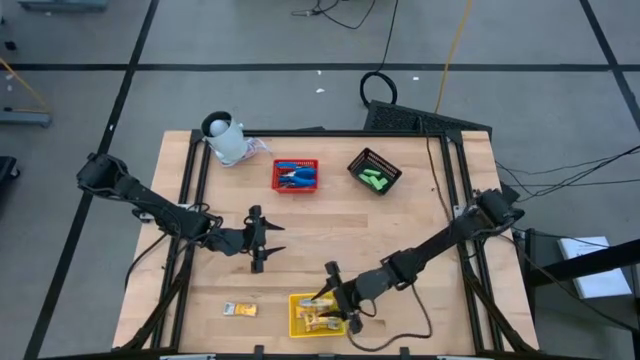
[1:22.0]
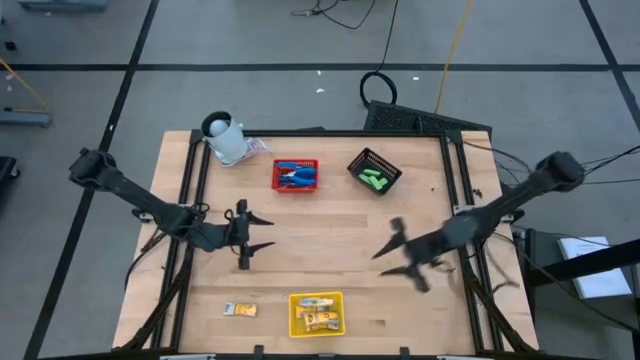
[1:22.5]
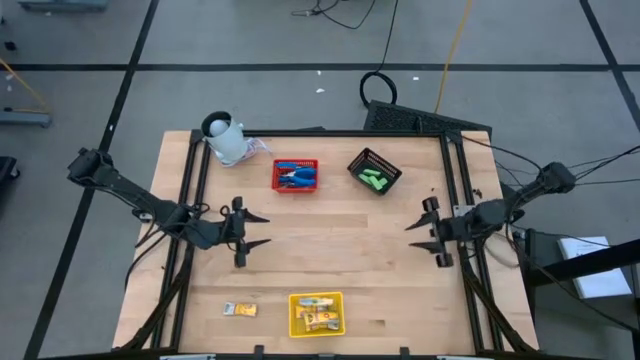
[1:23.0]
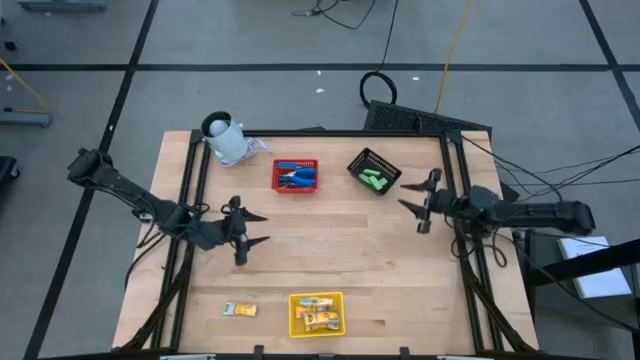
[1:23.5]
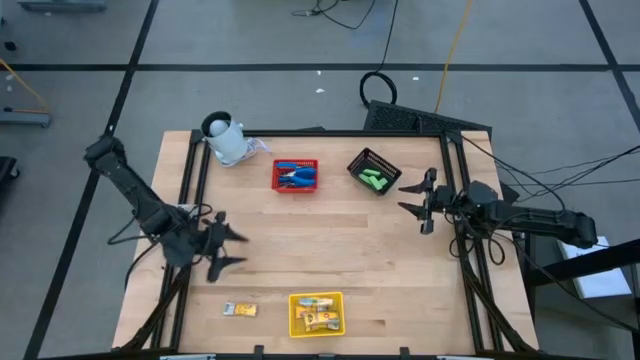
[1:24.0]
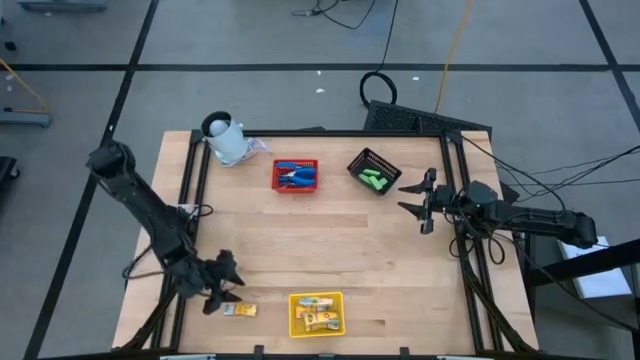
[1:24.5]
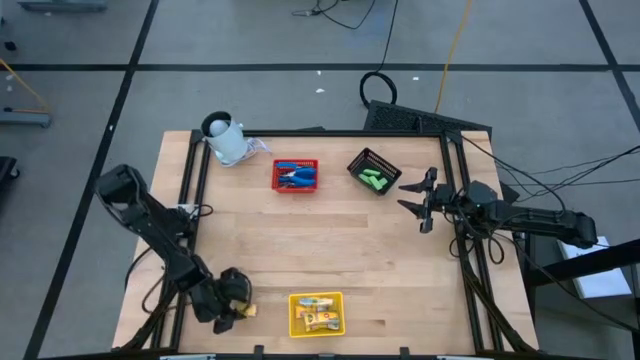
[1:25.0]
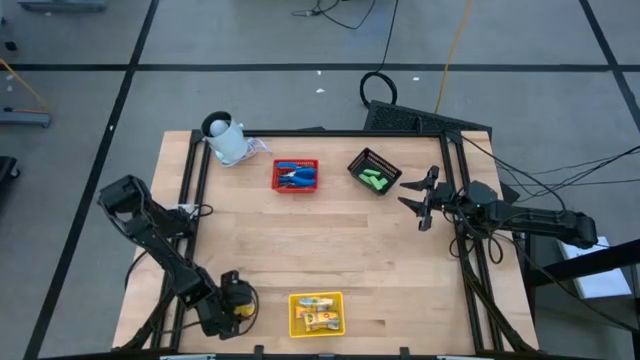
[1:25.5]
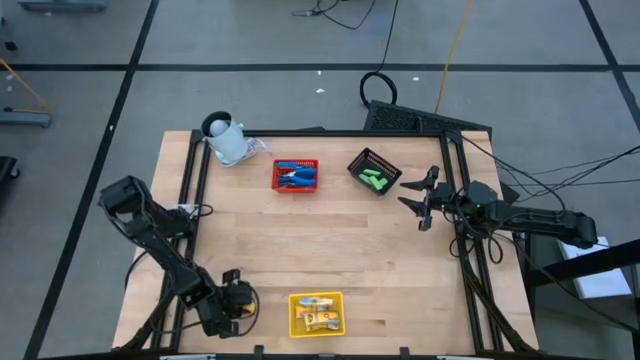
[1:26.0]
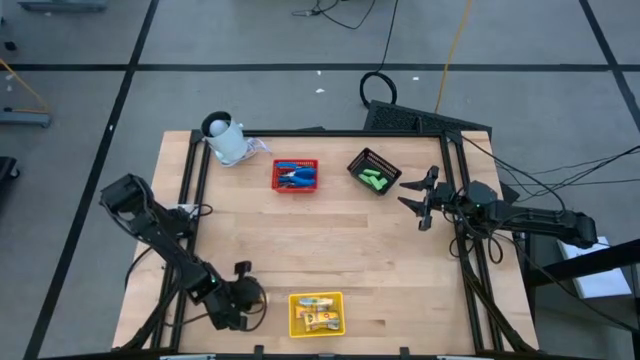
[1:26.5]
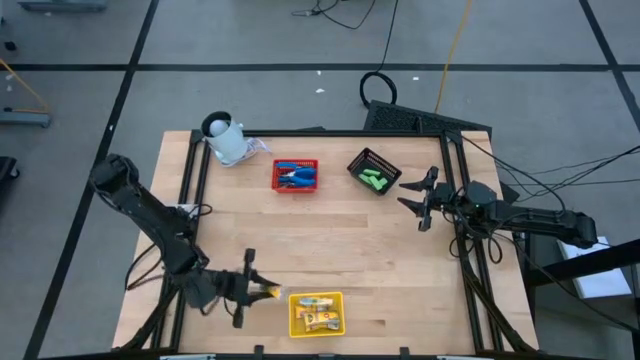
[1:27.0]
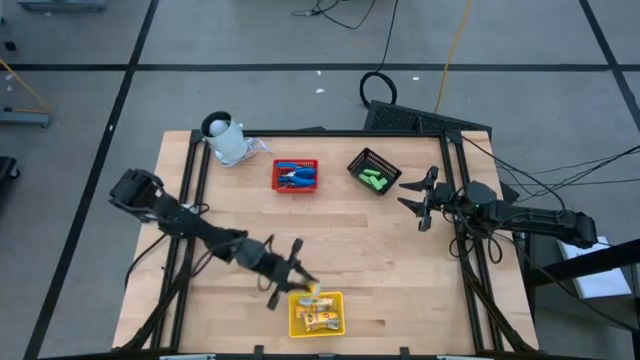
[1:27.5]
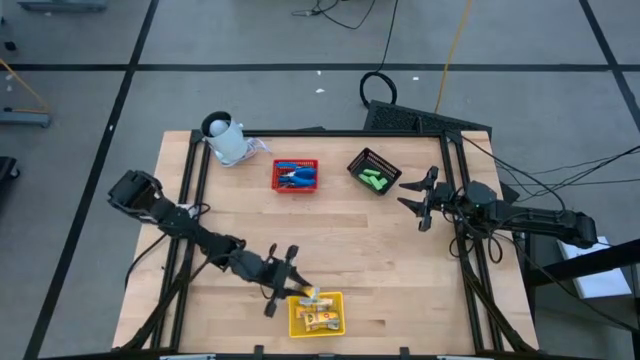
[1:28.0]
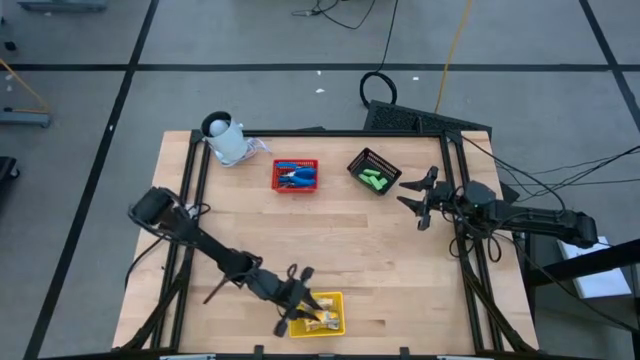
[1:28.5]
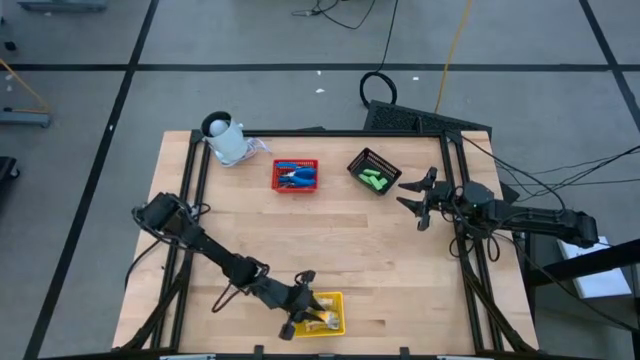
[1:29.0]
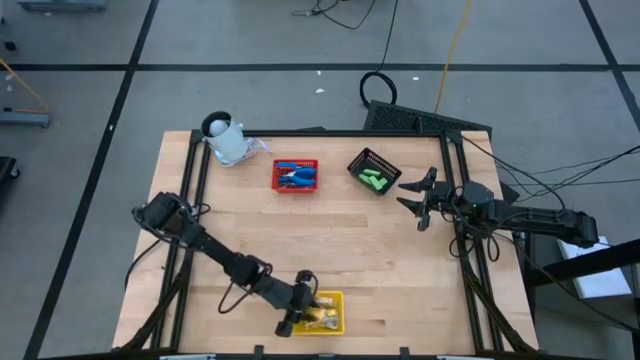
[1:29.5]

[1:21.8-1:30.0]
Task: Pick & Place School Supplies
Put the yellow crayon box into the yellow bin

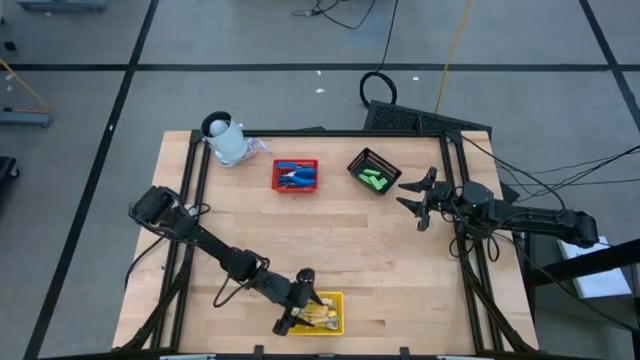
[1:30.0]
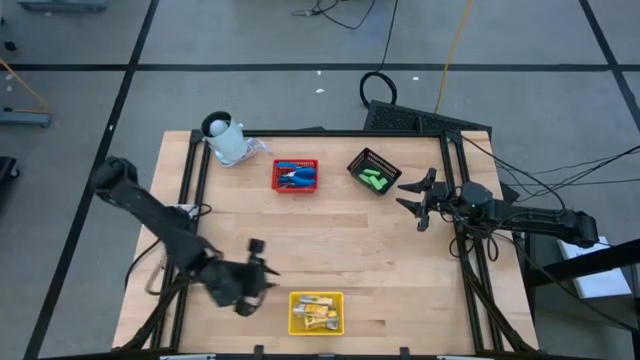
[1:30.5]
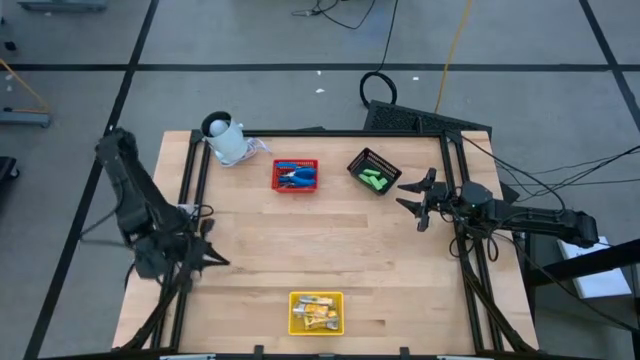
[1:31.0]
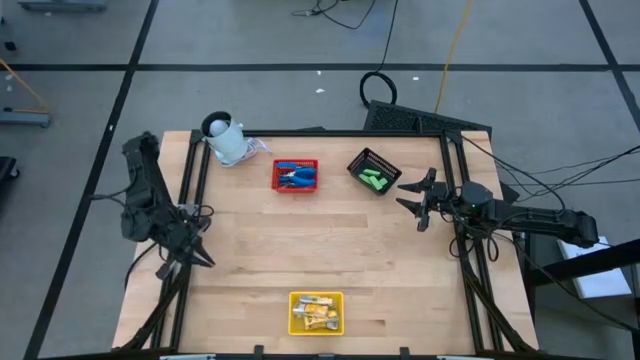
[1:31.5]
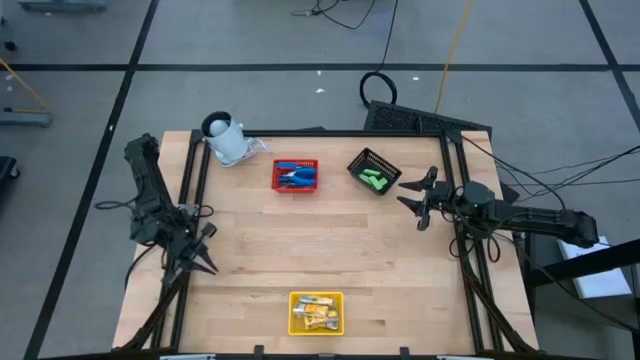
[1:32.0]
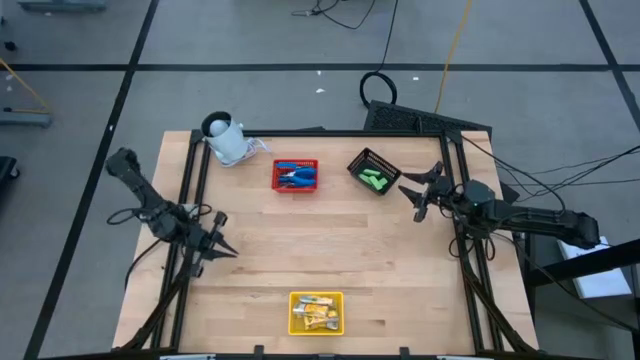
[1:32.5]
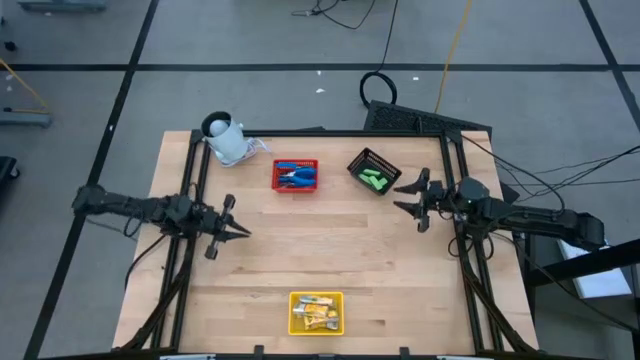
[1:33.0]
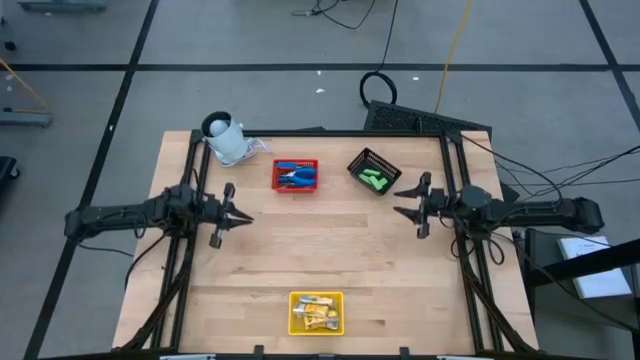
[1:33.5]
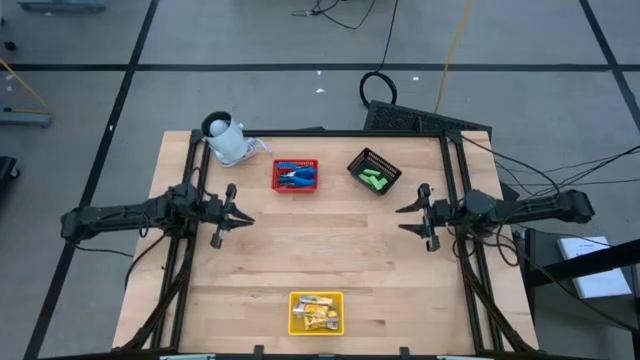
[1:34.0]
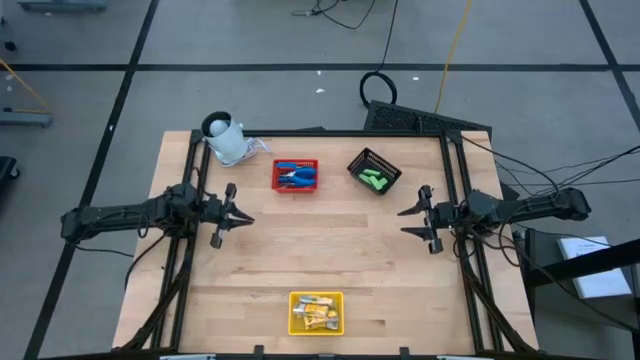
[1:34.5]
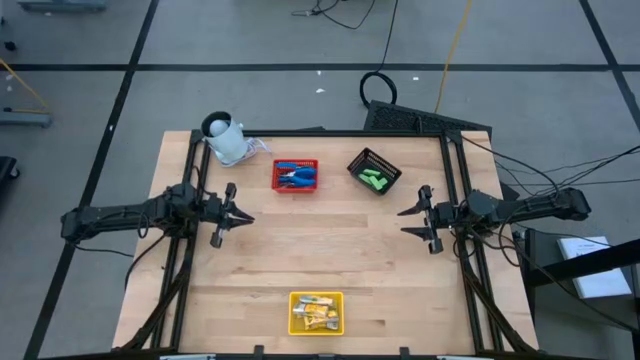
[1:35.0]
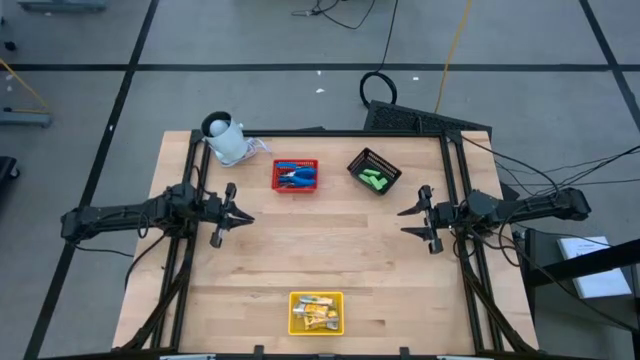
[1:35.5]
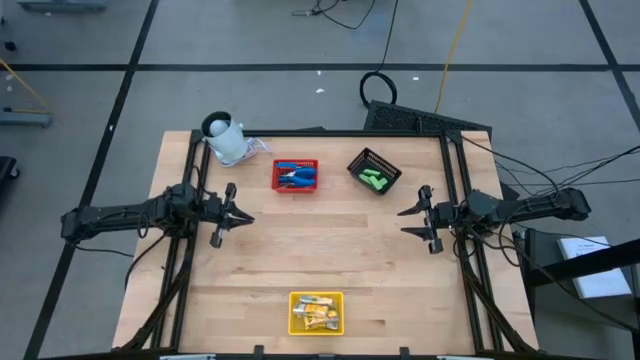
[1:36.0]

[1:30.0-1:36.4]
Return to Home Position

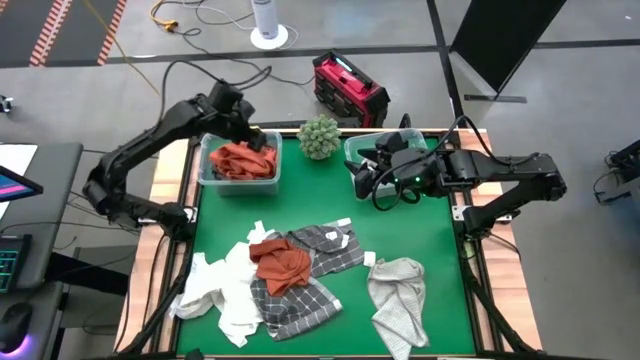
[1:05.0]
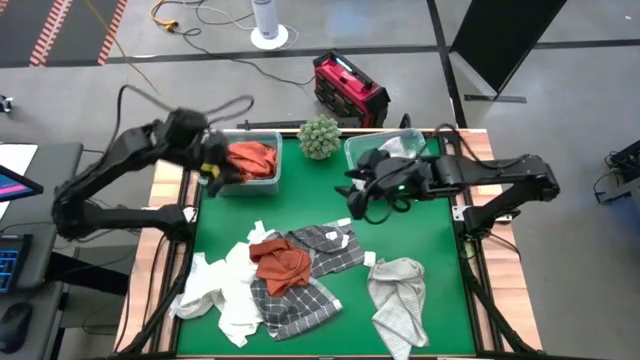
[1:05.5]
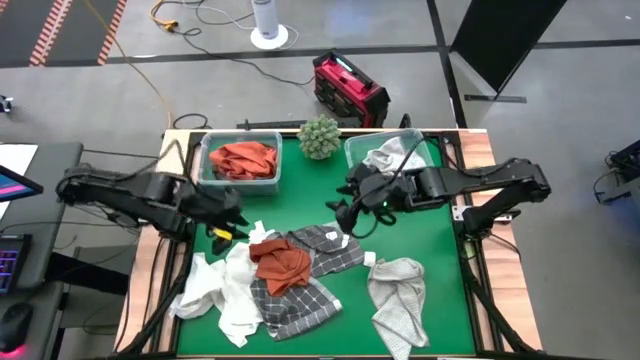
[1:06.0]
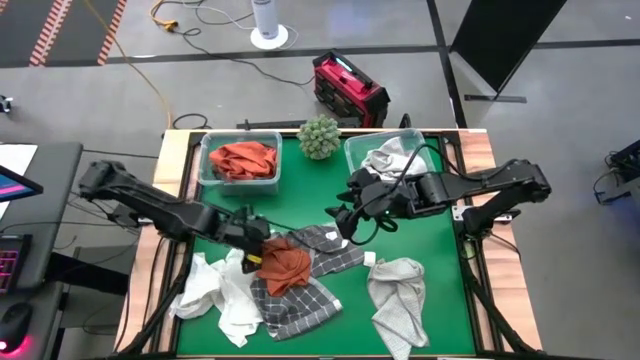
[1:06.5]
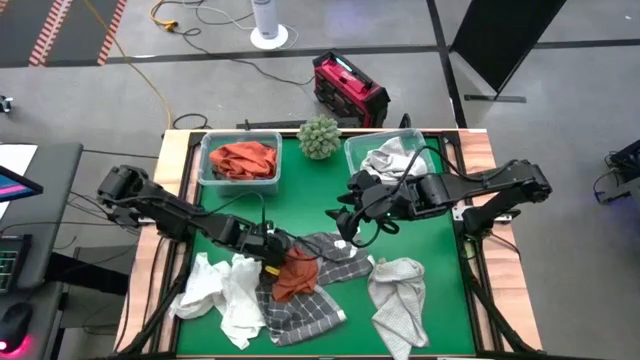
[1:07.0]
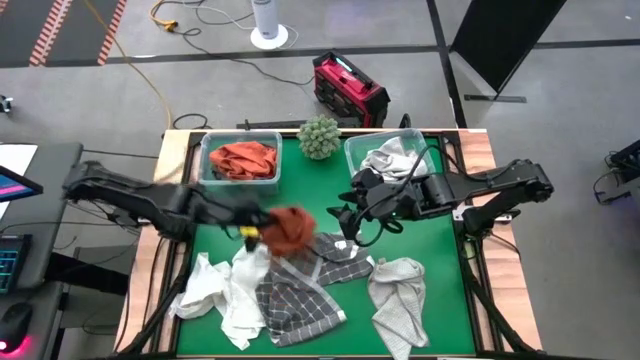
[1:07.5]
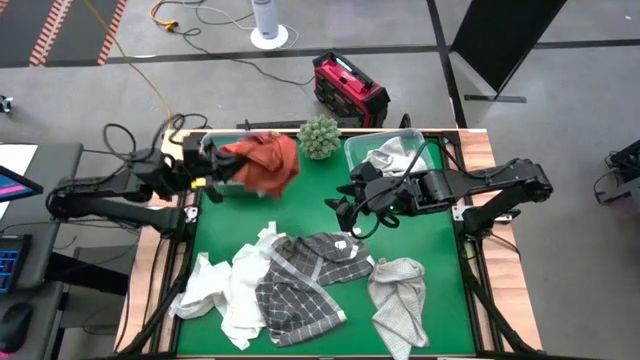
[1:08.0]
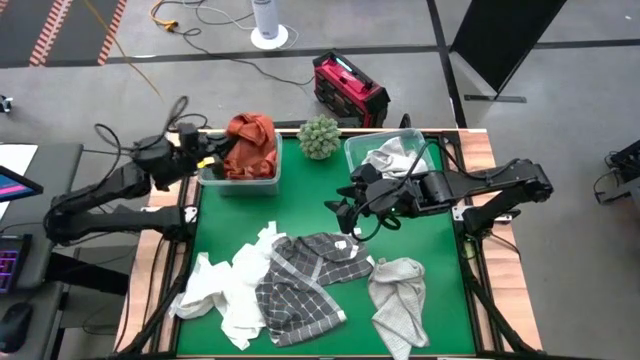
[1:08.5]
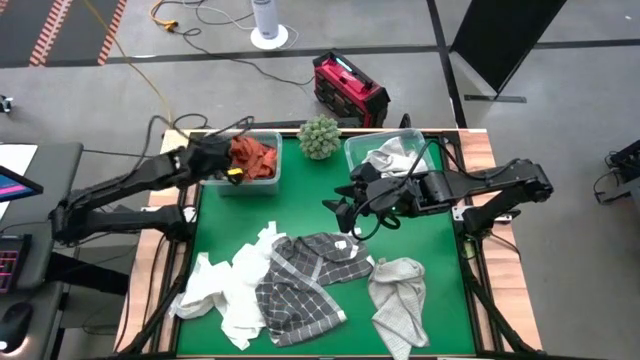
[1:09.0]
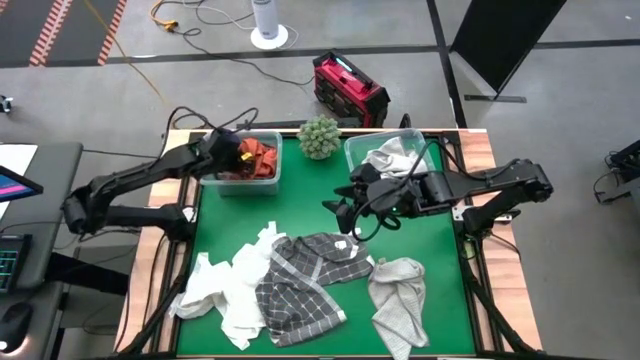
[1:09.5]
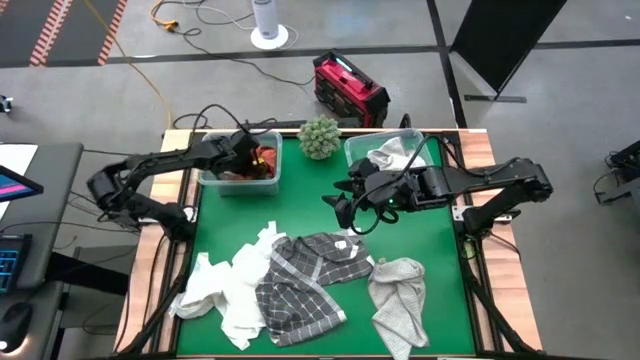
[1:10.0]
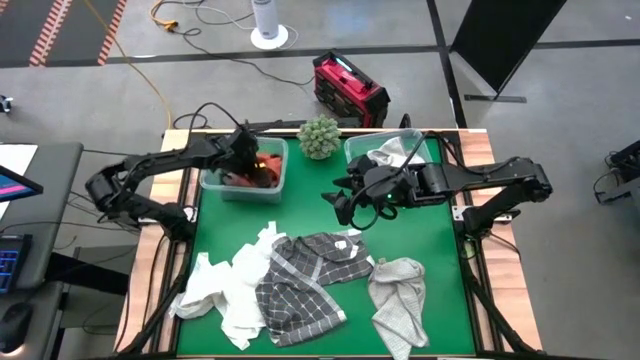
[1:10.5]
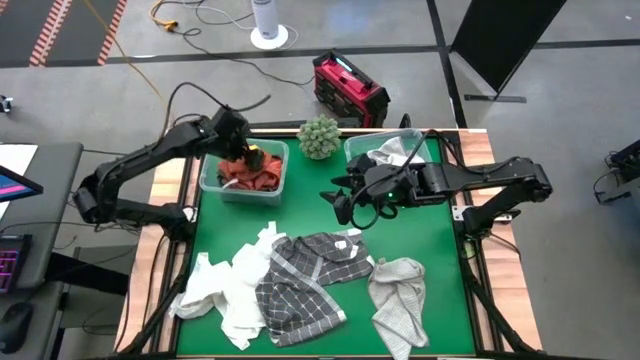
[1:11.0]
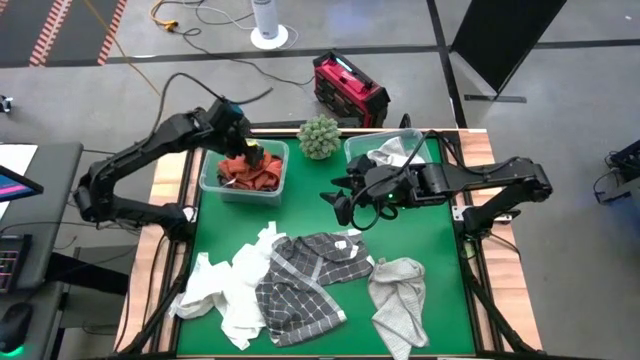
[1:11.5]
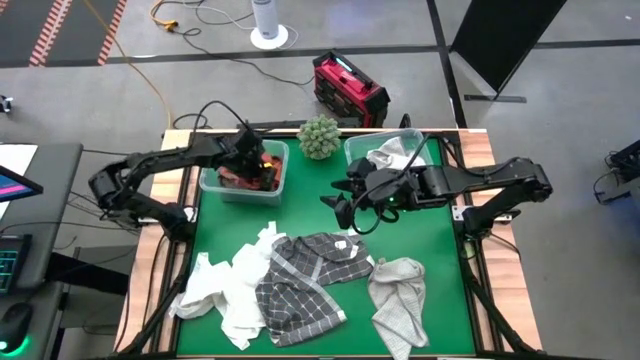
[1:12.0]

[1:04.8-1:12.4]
Task: Sort towels by color in basket
Put the orange towel into the left transparent bin
